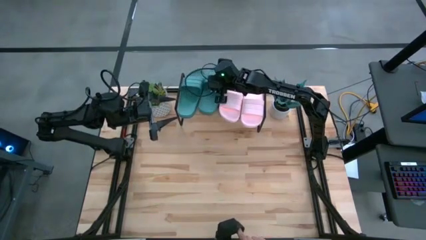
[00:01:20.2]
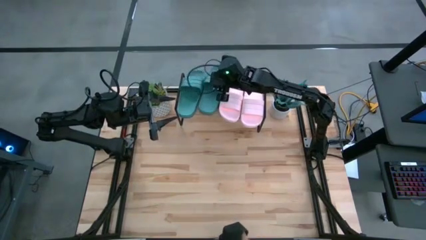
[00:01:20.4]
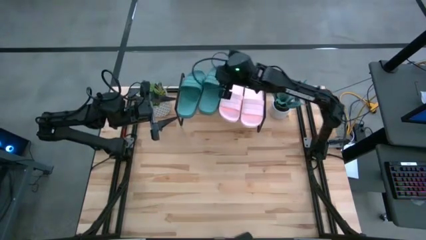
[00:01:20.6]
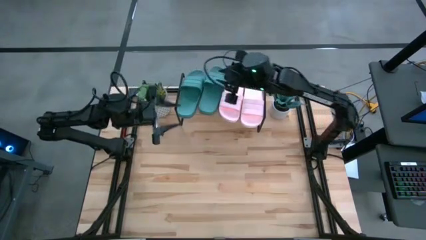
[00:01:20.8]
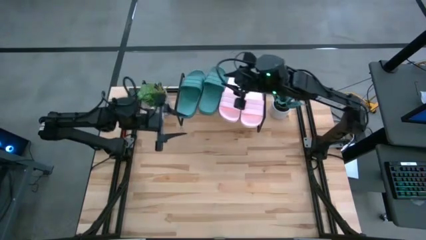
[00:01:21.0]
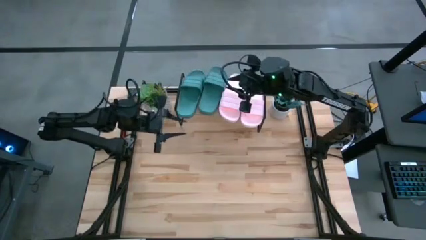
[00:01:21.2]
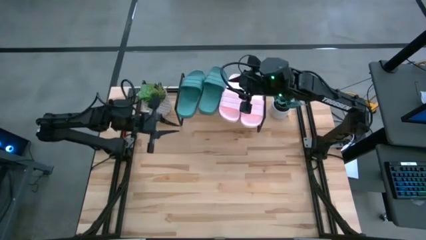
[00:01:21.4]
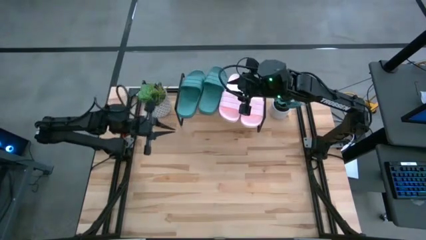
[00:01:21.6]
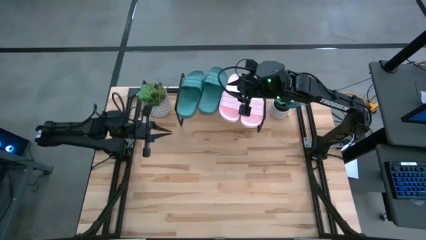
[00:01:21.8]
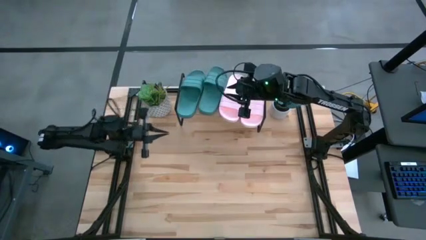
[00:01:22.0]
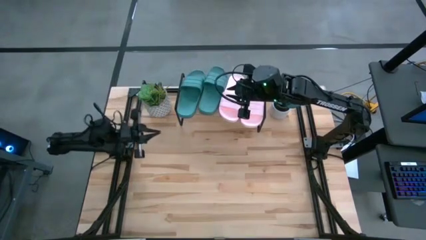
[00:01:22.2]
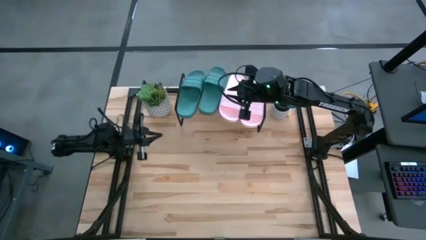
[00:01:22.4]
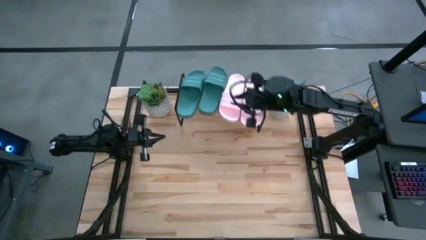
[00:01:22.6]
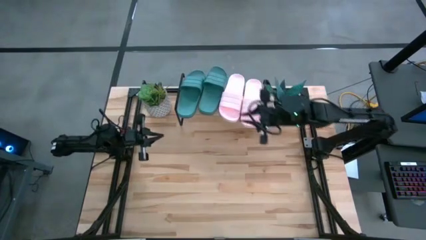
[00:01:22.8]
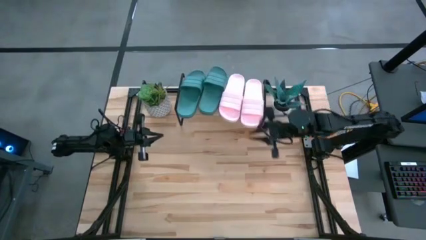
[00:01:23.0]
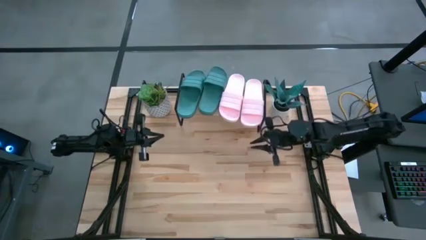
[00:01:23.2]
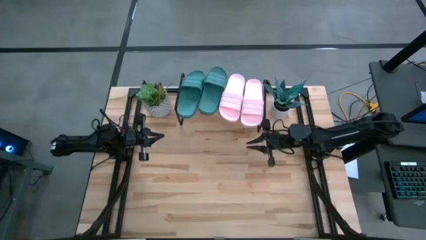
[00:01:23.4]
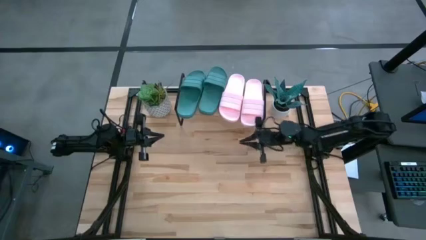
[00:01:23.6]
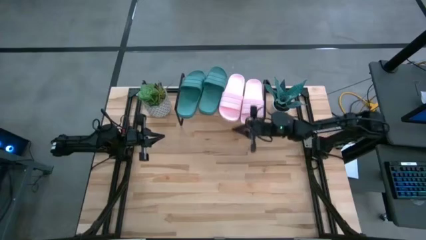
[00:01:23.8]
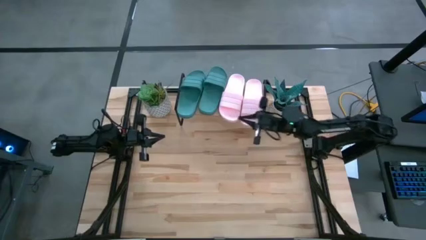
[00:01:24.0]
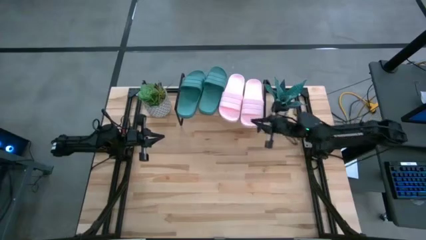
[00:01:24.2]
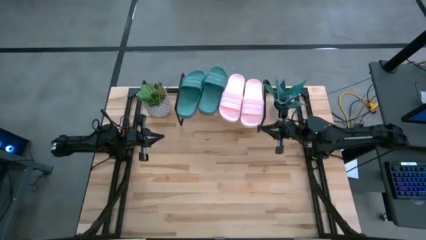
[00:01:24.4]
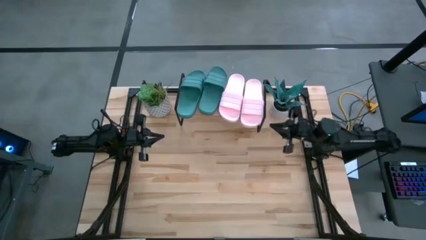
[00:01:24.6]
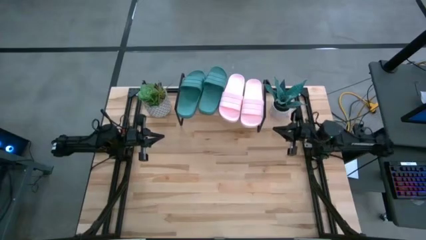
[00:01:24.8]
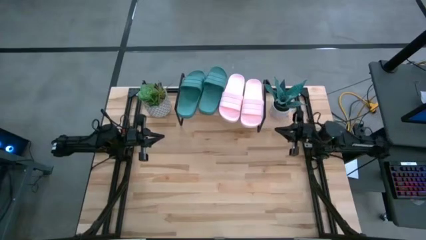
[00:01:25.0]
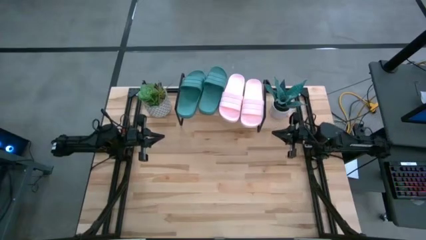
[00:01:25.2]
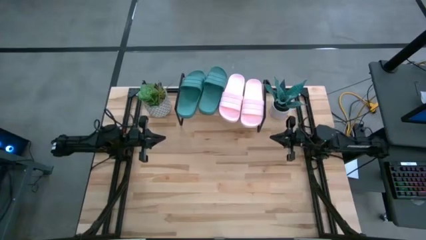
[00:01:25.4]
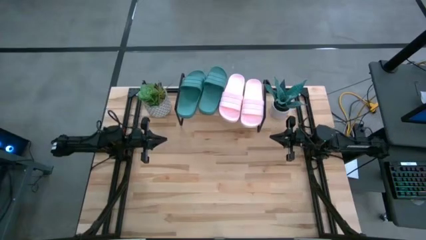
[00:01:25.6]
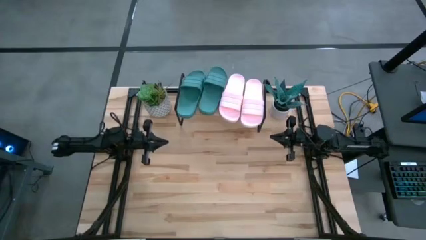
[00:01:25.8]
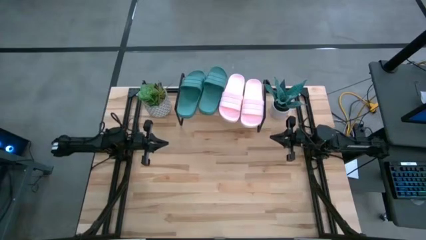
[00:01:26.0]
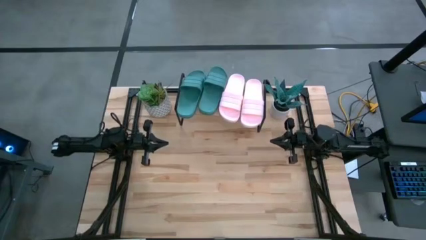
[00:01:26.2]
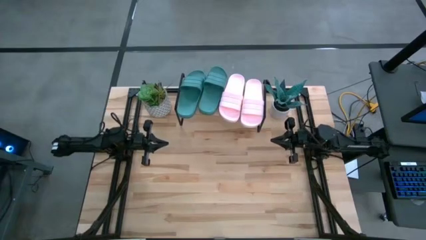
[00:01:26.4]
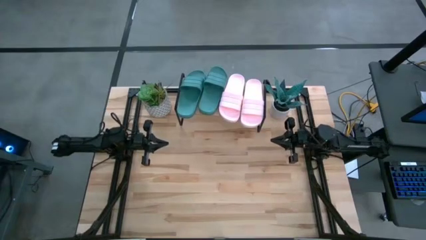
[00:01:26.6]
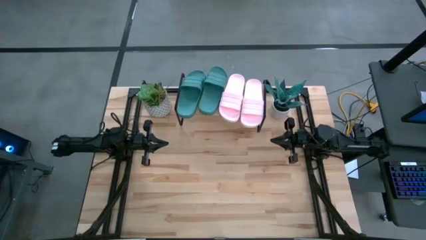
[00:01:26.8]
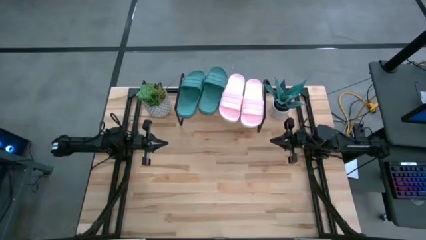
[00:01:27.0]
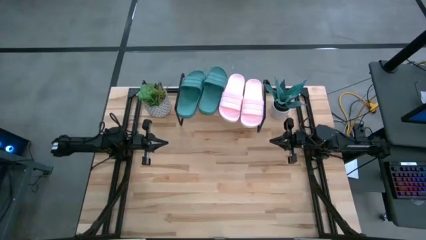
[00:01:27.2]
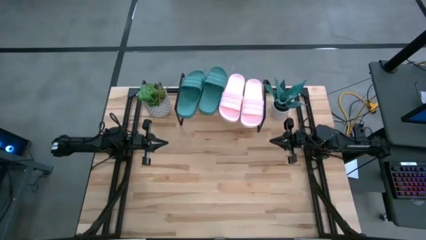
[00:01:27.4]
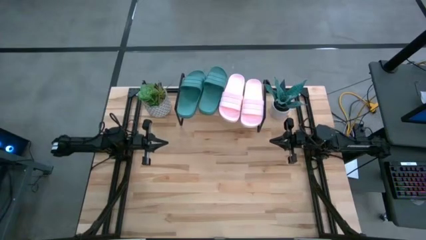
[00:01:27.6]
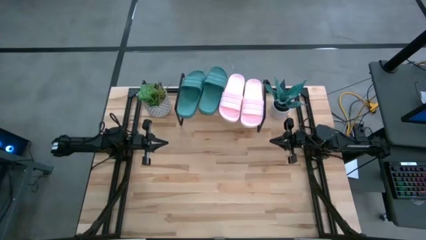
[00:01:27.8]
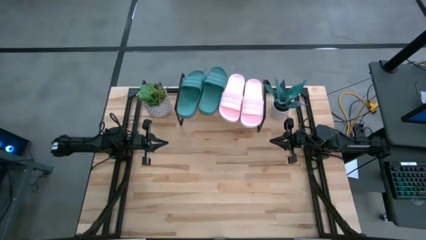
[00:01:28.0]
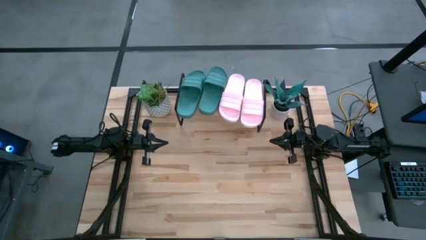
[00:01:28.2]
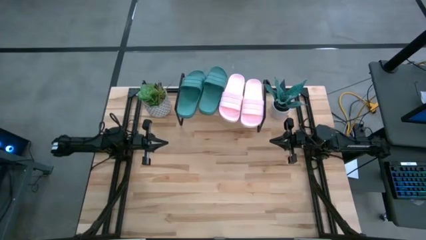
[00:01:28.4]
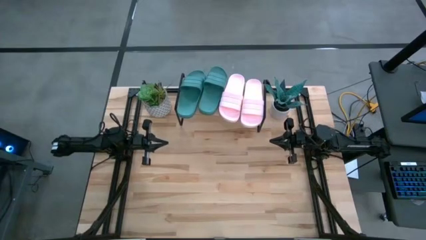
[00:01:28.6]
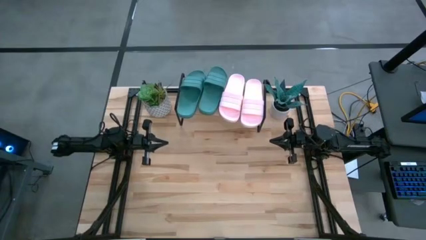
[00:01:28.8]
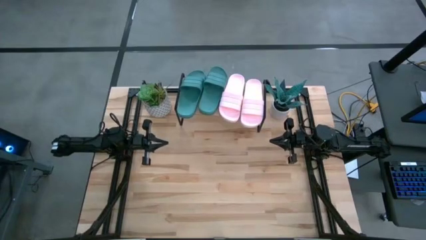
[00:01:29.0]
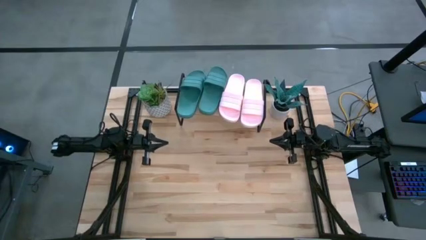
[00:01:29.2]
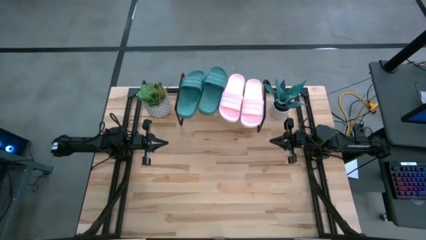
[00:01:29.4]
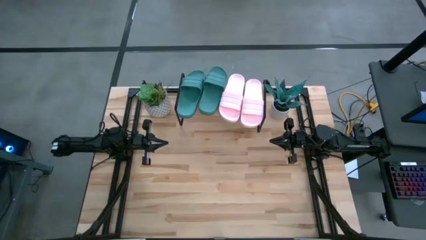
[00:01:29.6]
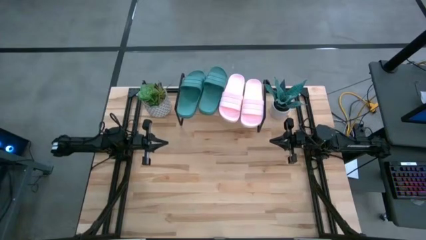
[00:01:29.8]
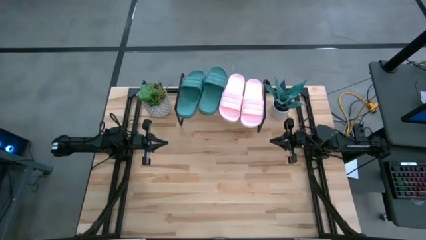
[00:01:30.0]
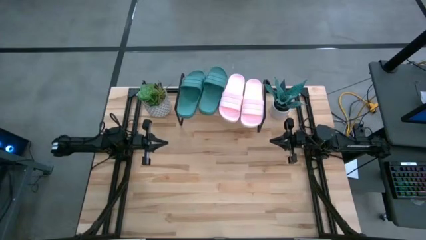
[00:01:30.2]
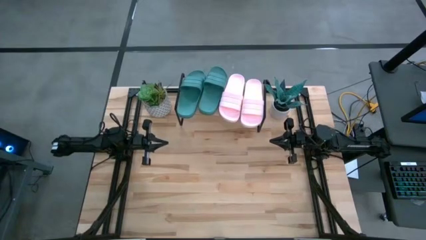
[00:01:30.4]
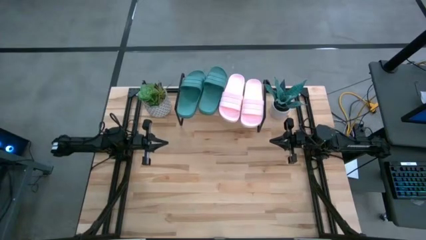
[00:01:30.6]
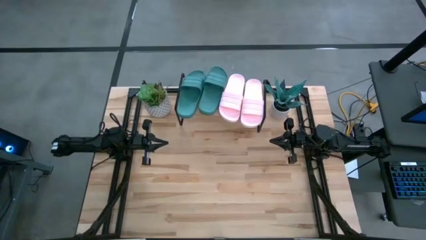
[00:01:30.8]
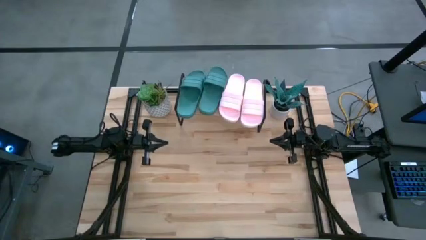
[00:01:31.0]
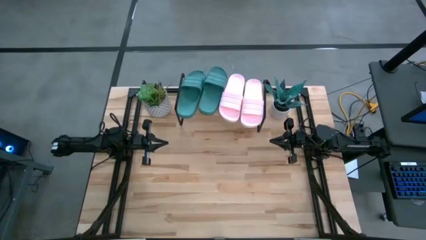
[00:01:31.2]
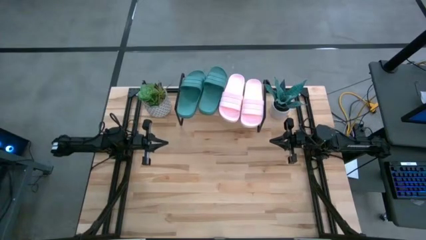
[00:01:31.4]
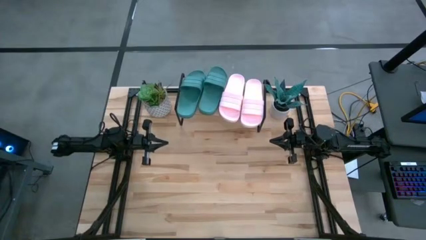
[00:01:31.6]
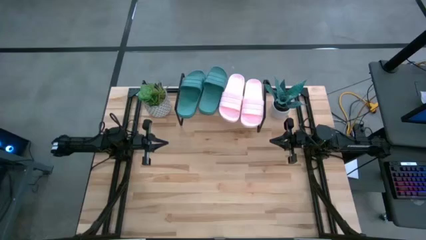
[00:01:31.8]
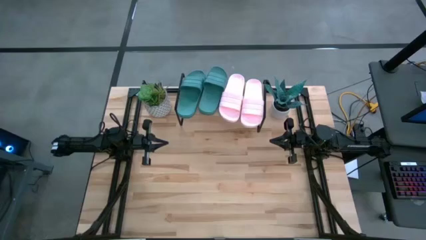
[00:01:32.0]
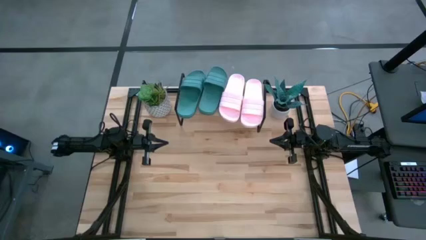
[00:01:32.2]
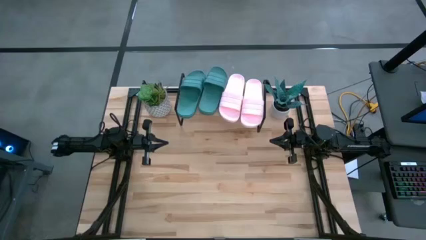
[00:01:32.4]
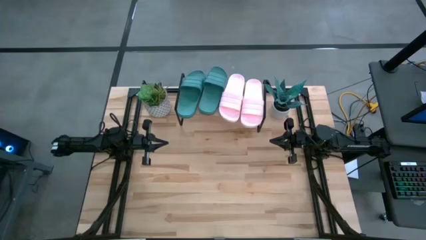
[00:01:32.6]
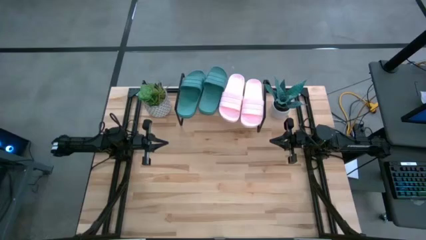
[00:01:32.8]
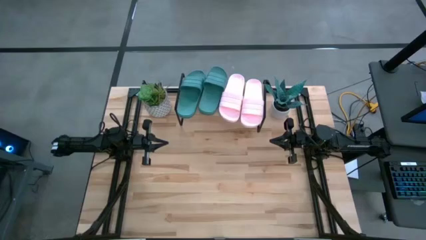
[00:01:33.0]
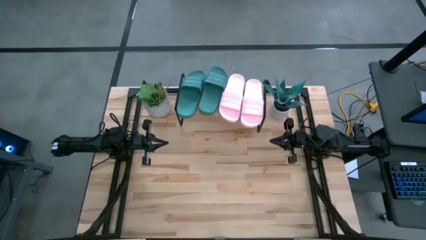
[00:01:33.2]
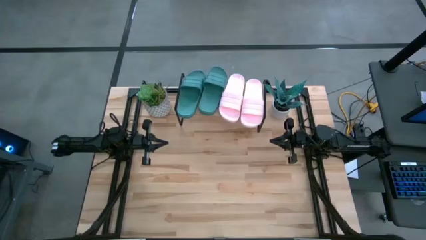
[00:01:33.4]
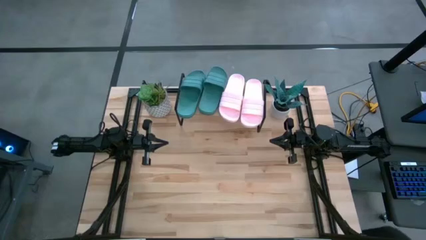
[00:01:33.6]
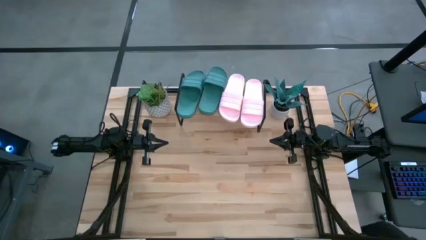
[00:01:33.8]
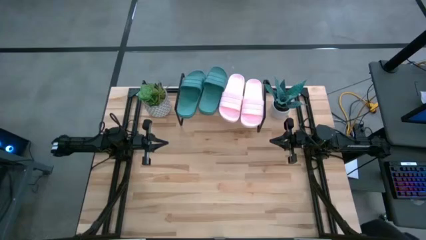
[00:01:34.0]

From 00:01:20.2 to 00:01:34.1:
Task: Pick and place slides into the shelf
Return to Home Position

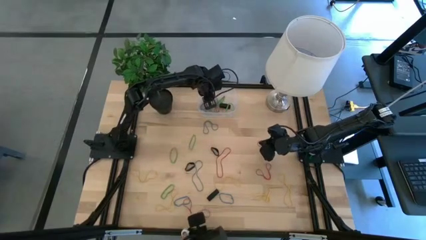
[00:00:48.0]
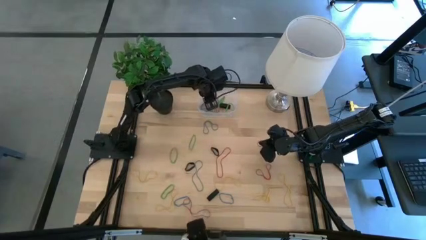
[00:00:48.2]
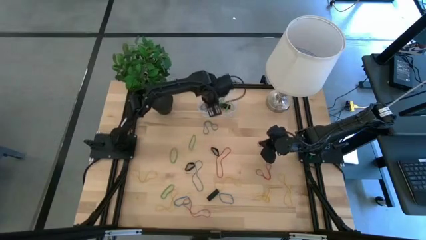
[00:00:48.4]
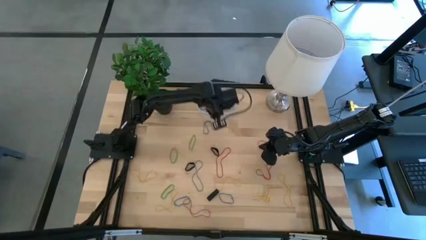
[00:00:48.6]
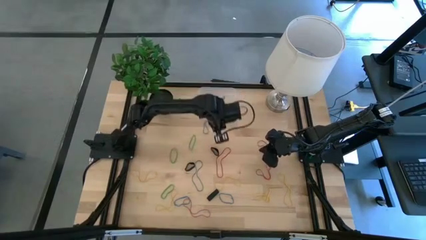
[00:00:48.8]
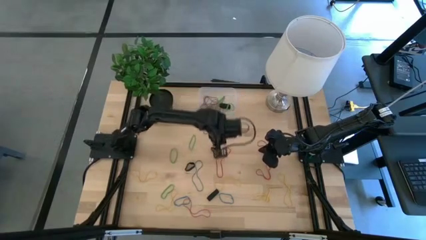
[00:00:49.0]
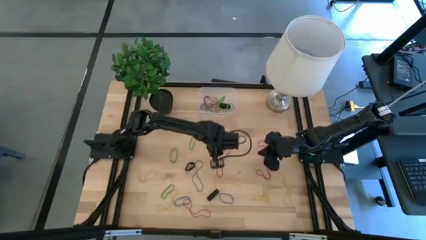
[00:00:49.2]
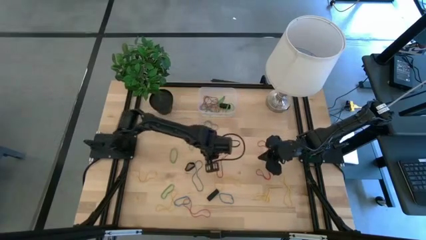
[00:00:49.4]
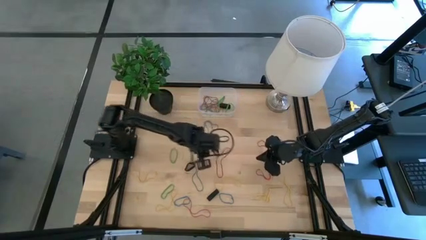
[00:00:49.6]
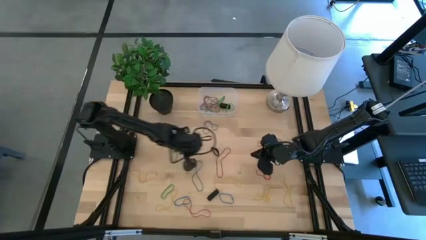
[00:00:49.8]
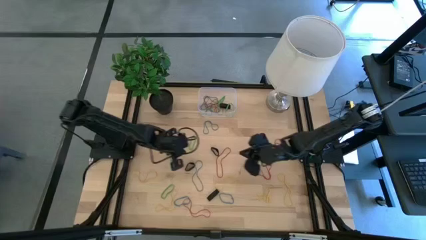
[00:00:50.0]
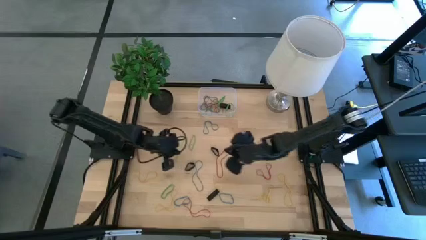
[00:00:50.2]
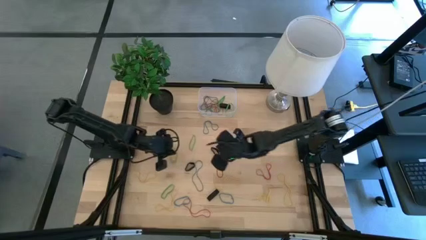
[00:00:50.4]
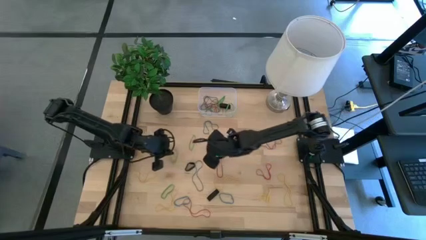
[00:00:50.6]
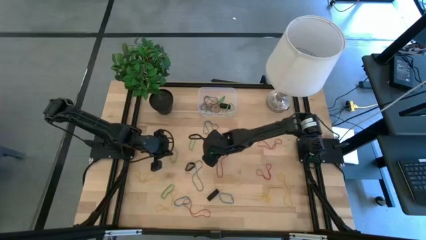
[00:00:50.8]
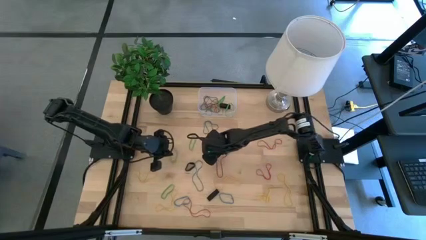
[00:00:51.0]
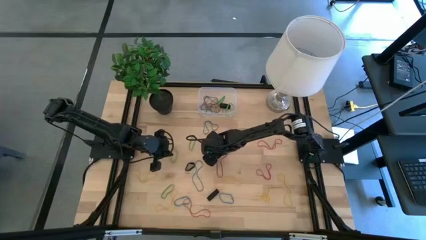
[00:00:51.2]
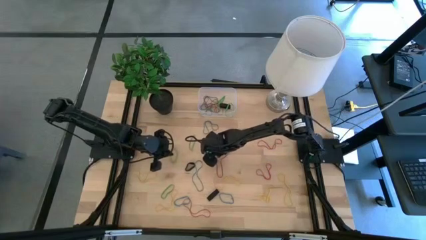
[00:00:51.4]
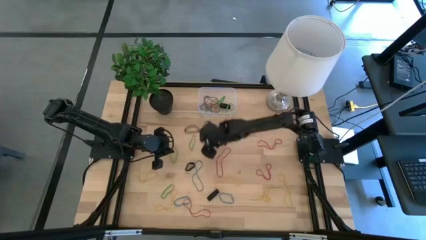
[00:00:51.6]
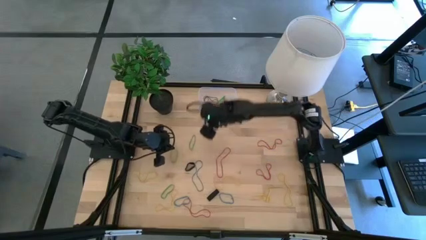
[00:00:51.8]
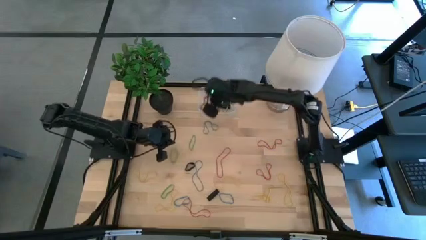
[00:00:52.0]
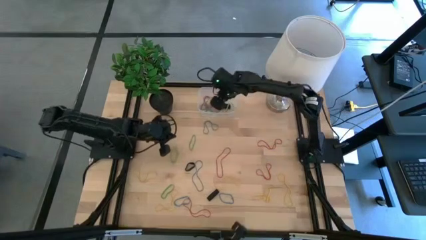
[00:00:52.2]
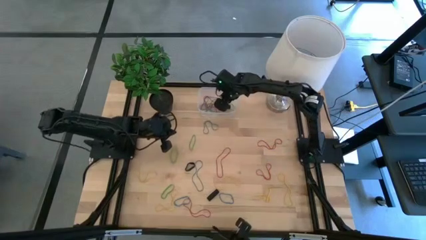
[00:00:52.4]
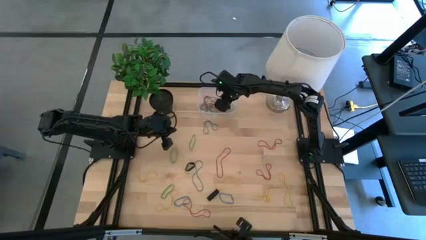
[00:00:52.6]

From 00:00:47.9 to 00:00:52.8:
Task: Pick and place rubber bands into bin
Put the black rubber band into the transparent bin
